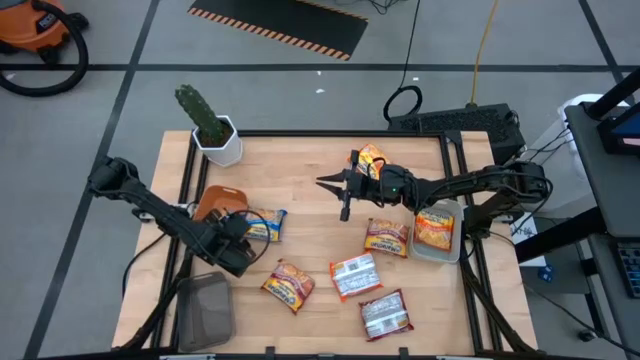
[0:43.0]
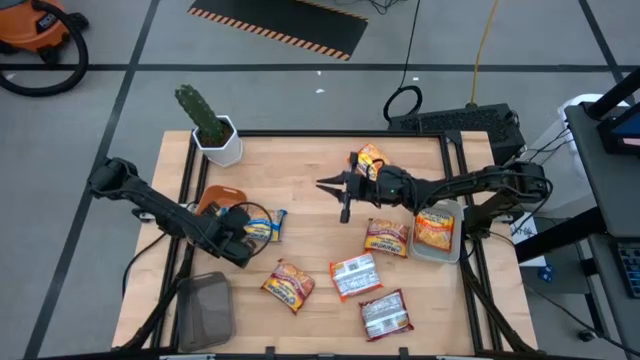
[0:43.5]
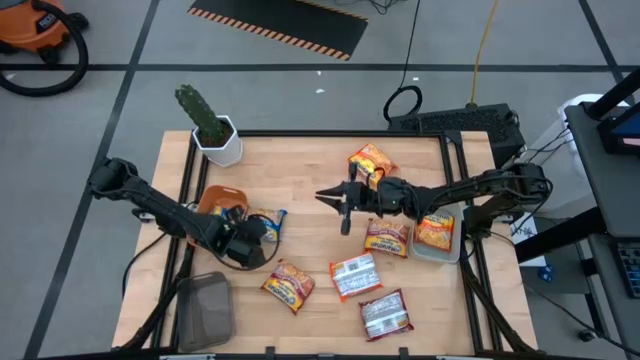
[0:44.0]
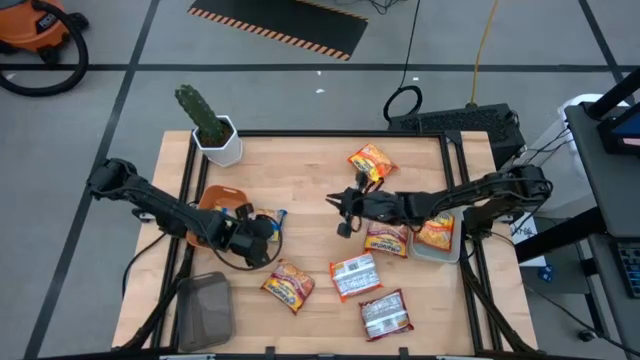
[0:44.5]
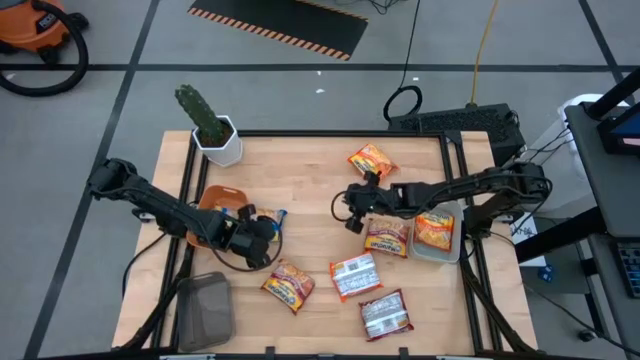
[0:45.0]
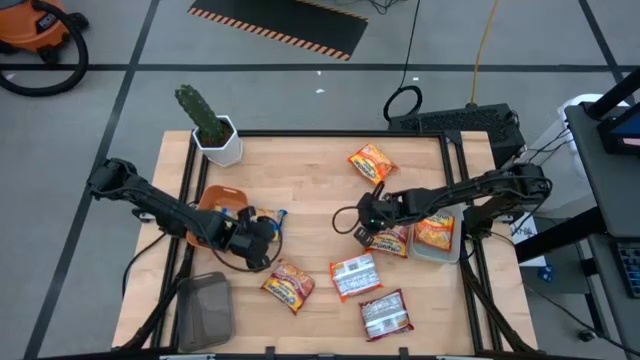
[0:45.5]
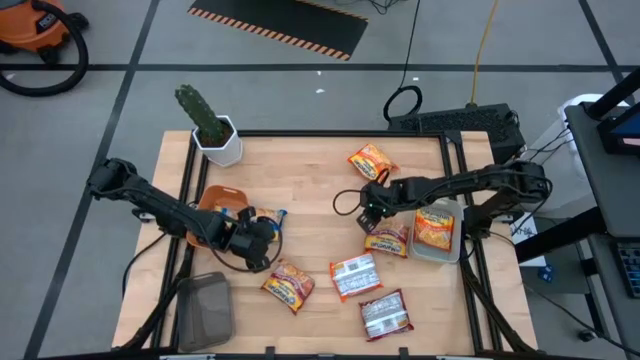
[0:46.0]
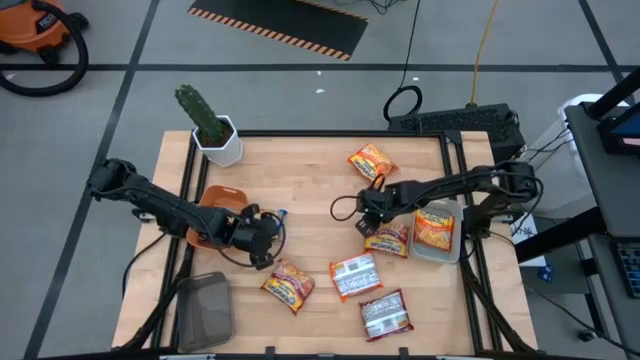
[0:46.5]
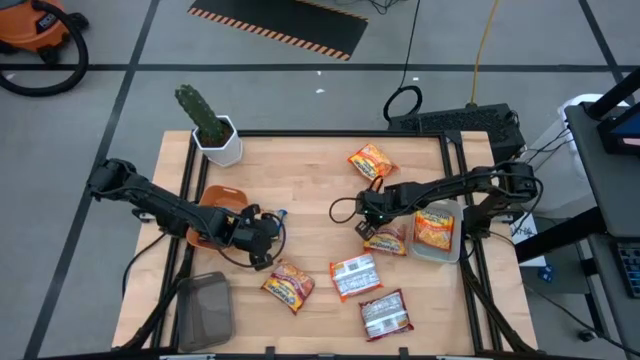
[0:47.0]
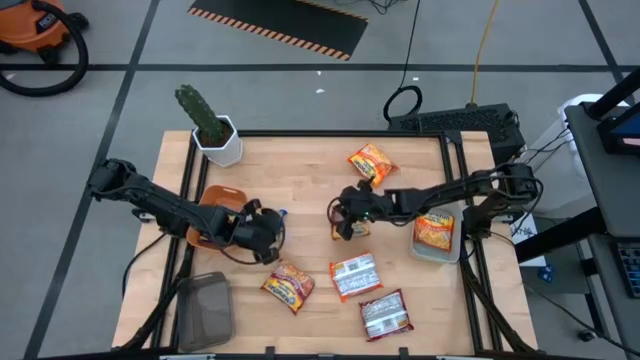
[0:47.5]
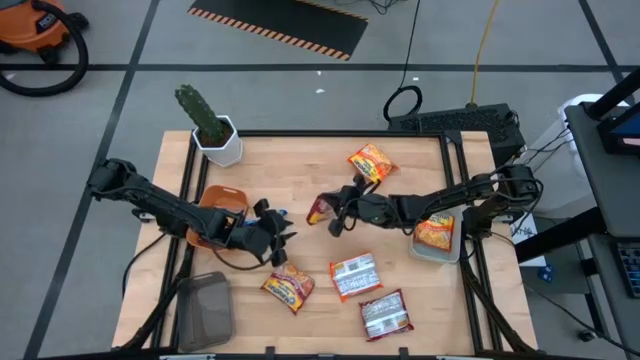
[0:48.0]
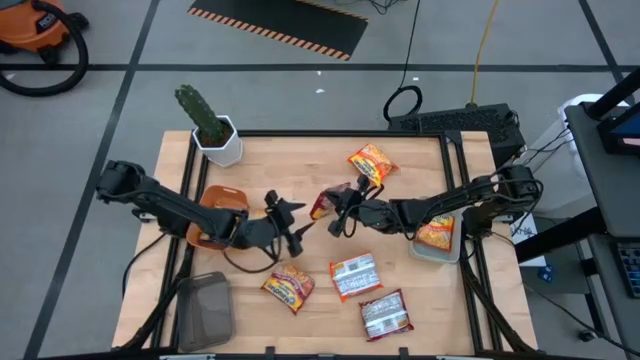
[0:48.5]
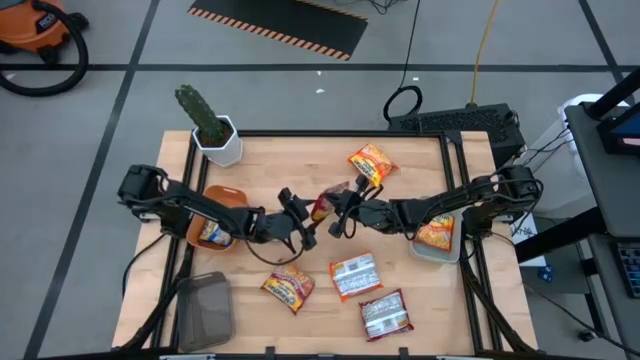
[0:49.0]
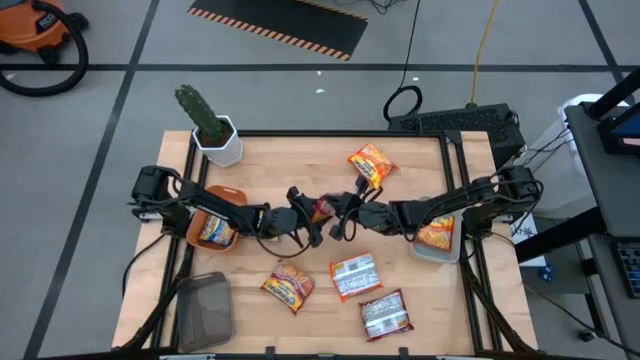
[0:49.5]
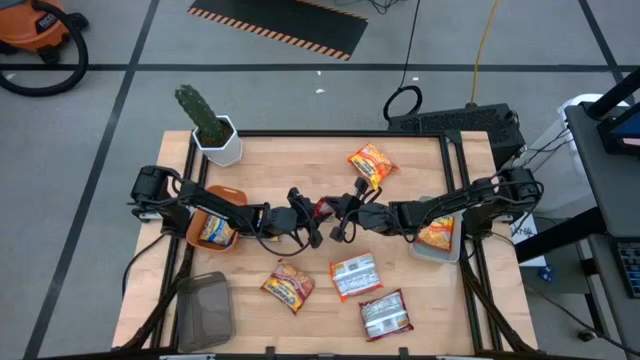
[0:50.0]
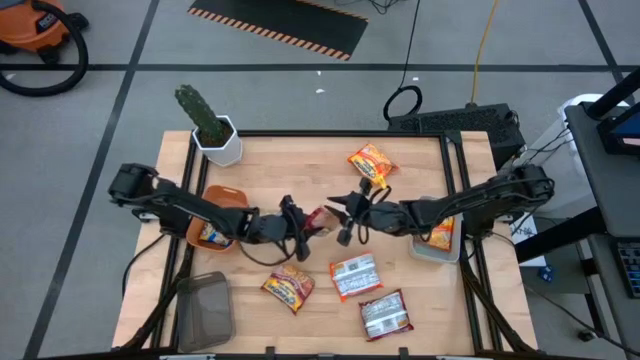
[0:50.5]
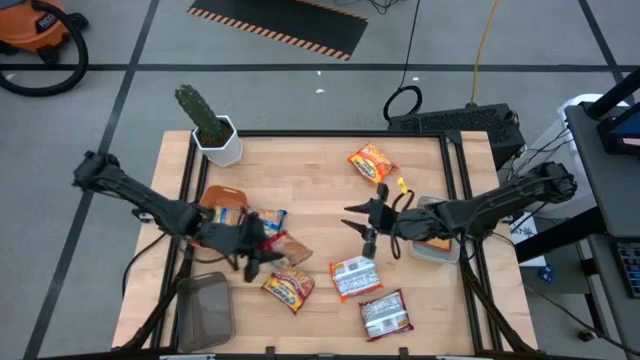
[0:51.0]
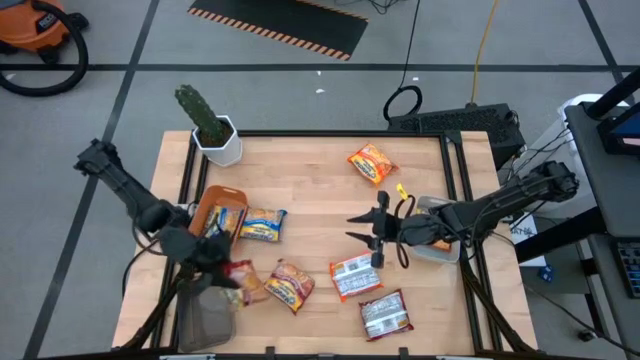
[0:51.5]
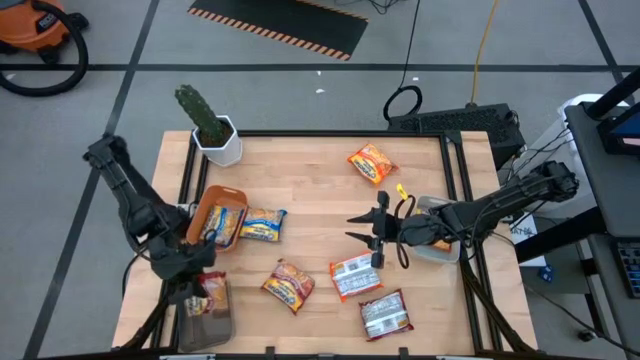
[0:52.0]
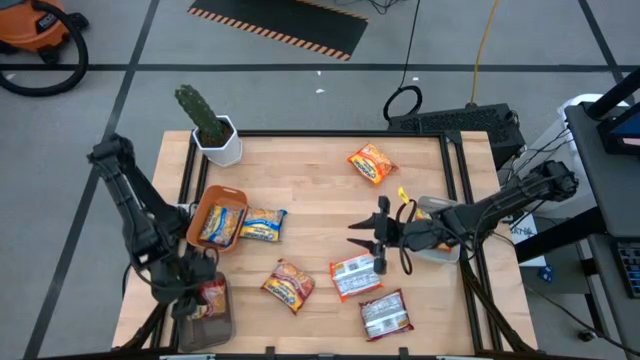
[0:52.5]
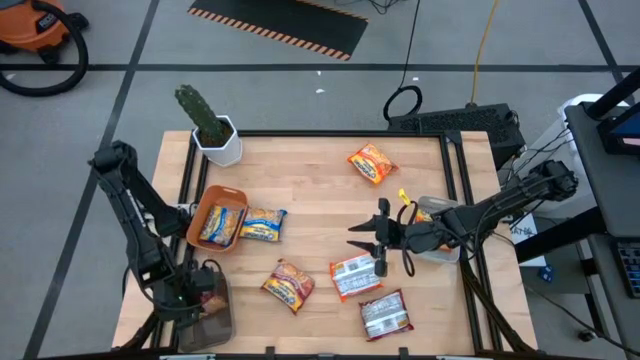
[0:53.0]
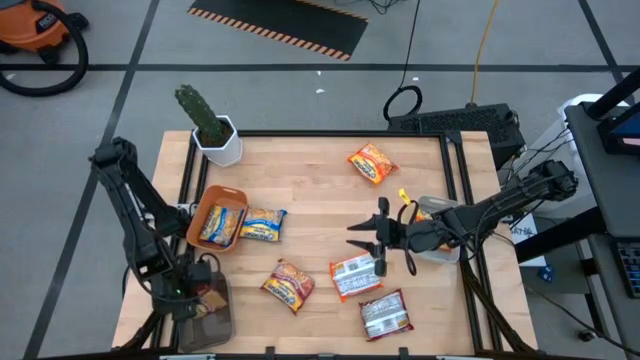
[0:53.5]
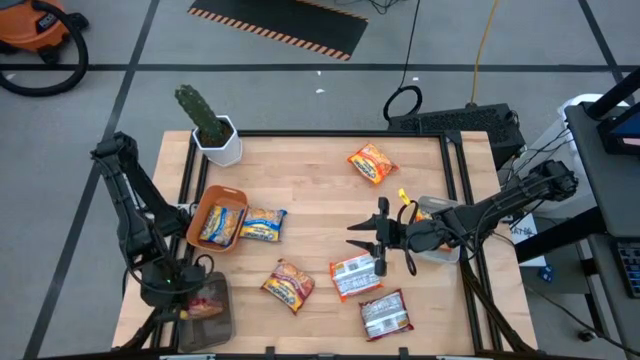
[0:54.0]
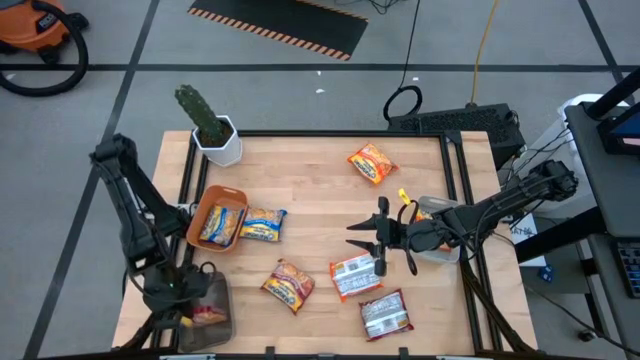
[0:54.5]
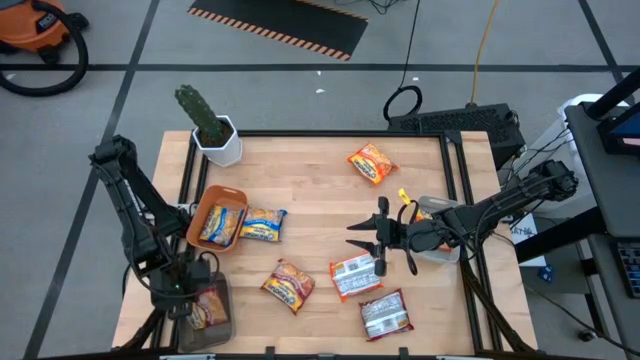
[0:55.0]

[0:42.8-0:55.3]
Task: Sort Maruchan noodles
Put the top red noodle pack into the black bin

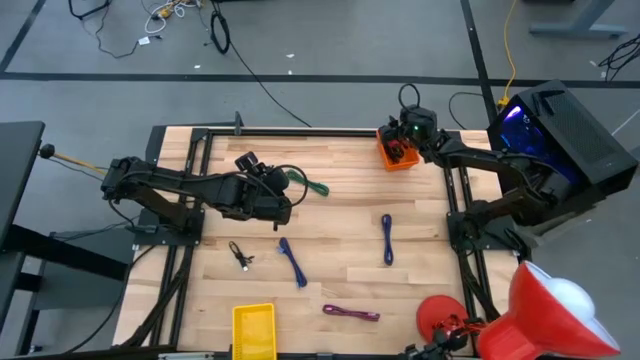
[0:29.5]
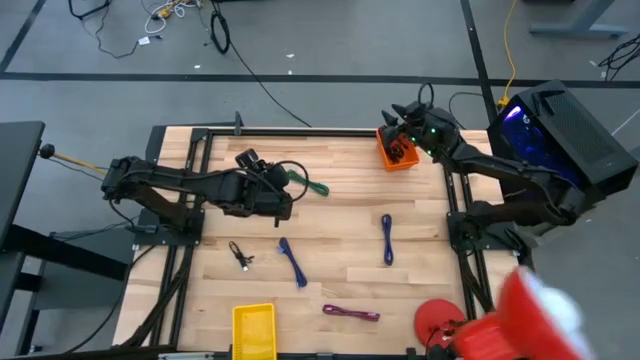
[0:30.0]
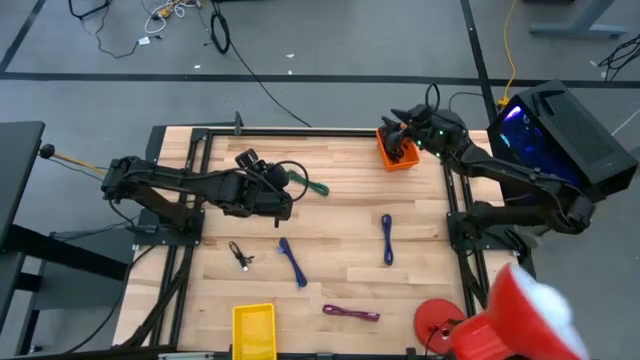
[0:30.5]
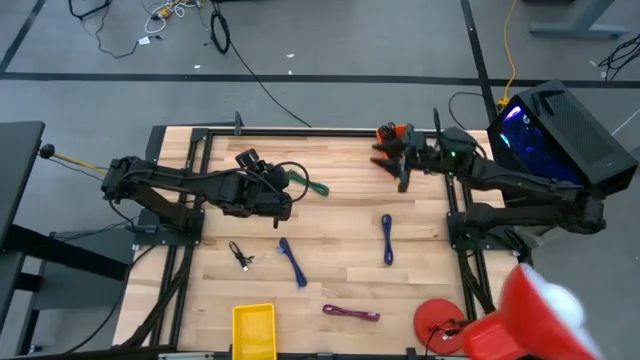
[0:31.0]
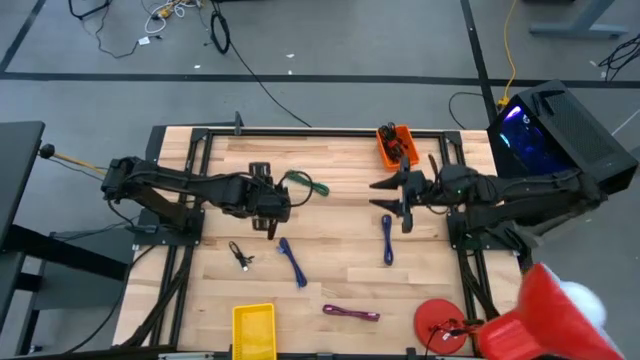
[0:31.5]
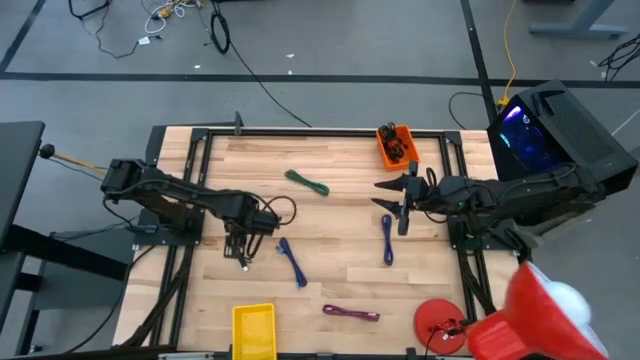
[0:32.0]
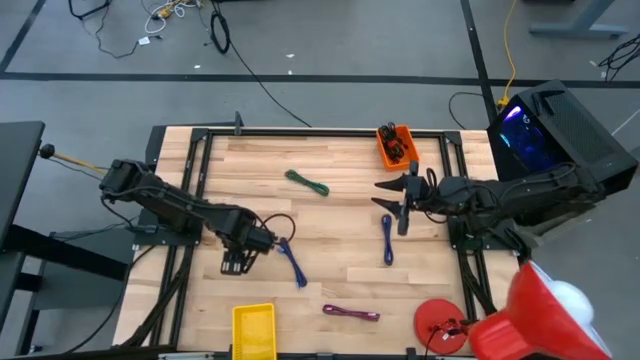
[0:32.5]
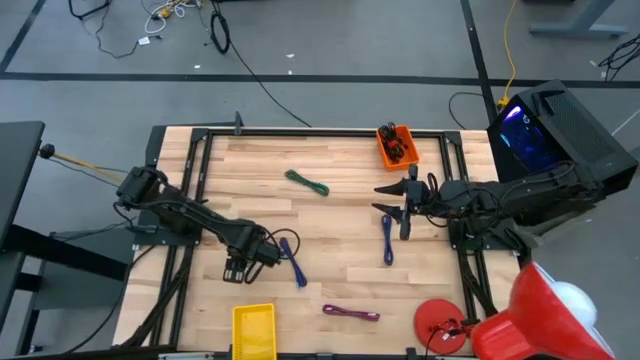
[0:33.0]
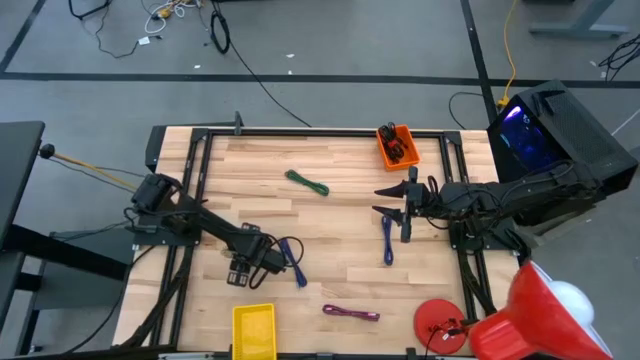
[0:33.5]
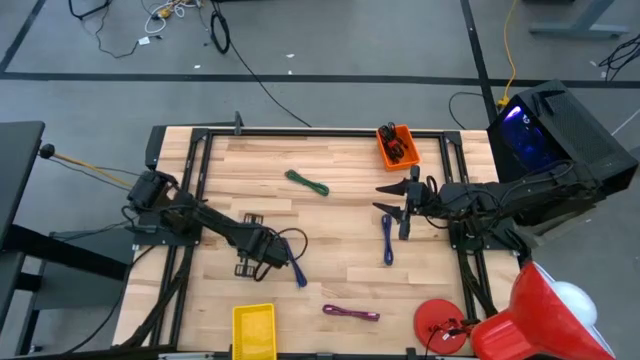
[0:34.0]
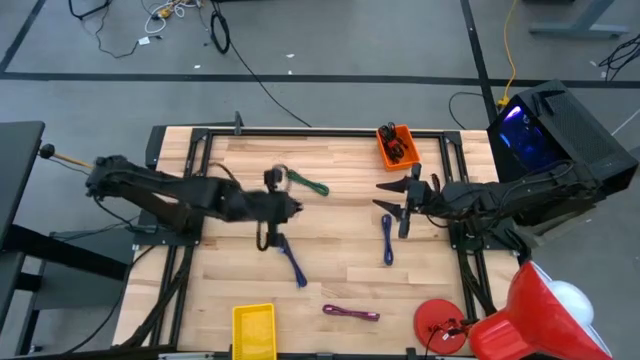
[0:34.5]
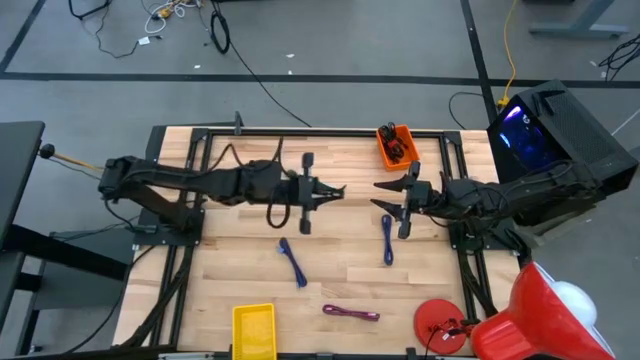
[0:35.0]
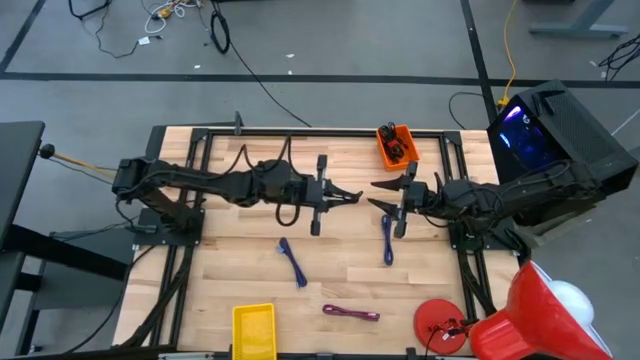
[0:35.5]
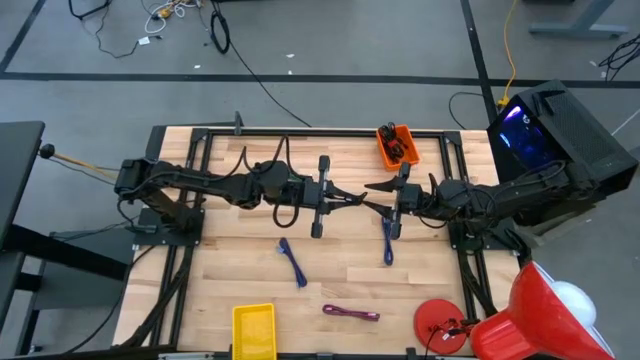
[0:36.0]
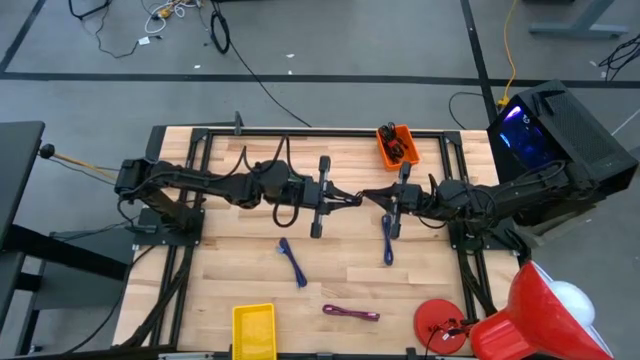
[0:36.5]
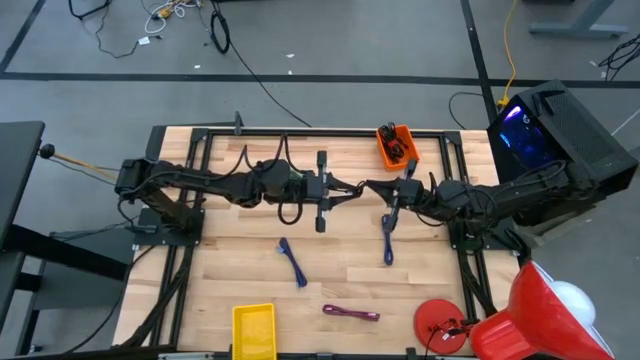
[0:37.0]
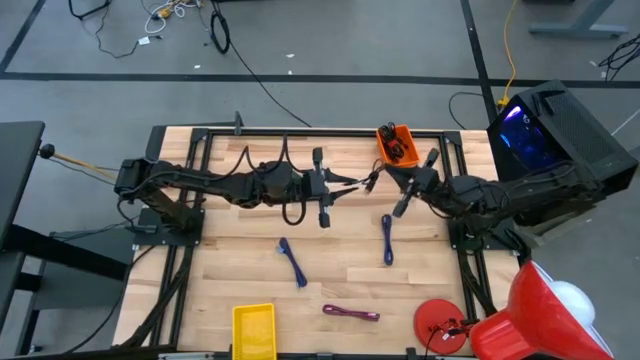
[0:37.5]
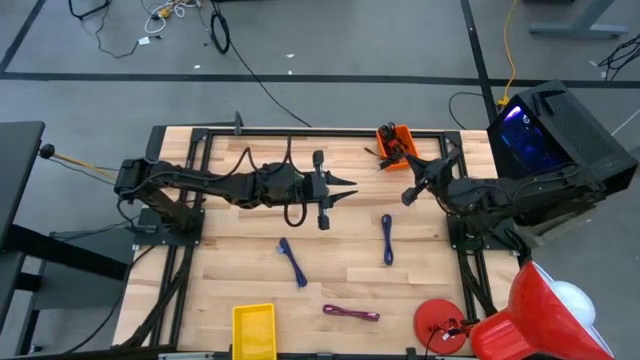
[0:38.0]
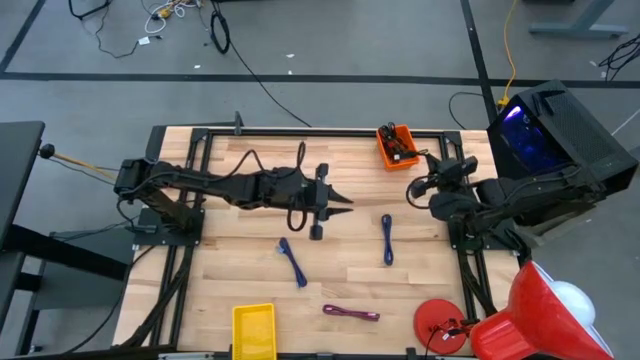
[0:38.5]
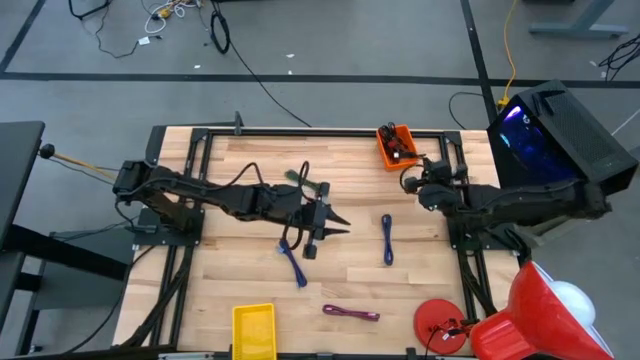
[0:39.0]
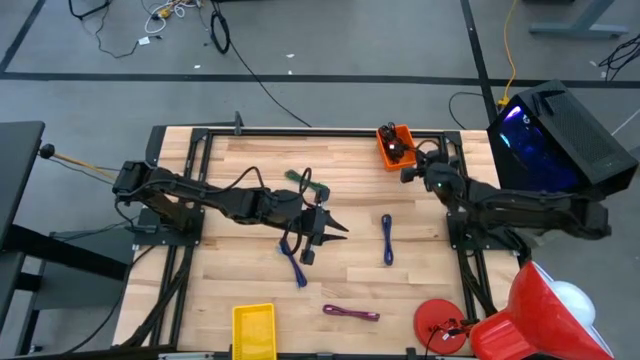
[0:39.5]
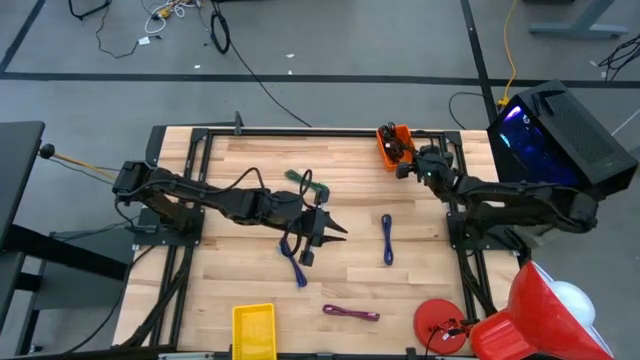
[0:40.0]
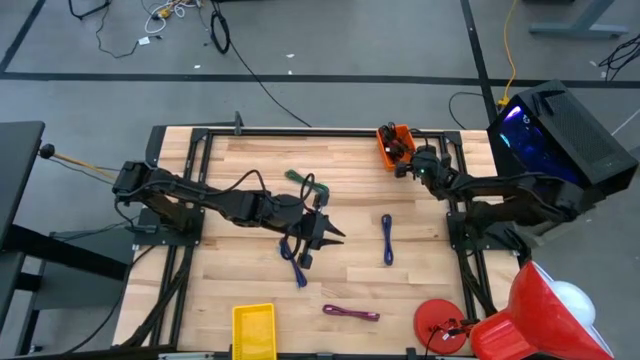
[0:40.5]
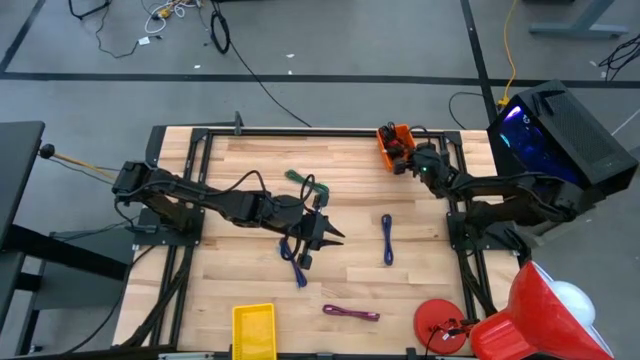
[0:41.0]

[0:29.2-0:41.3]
Task: Pick & Place USB Port
Put the black charger cable into the orange bin
